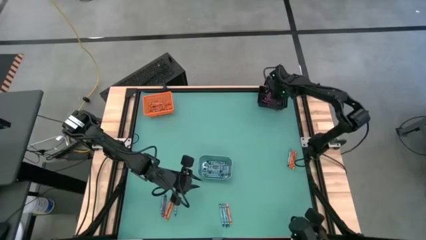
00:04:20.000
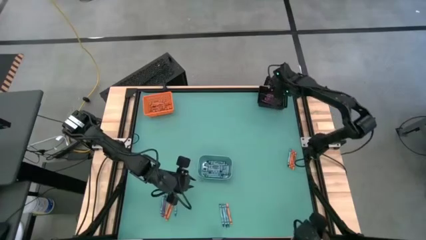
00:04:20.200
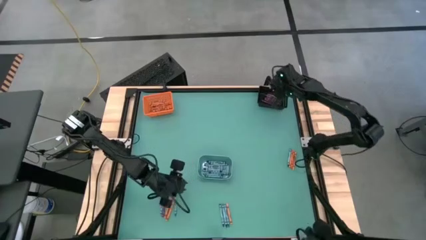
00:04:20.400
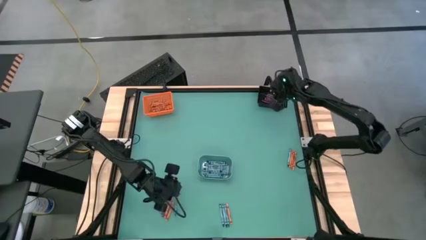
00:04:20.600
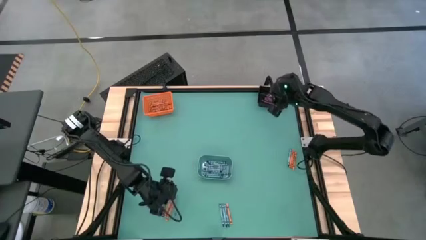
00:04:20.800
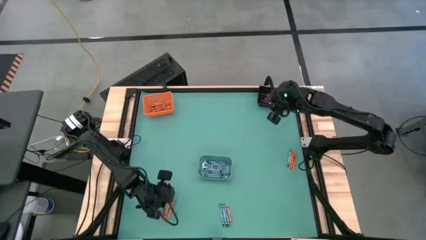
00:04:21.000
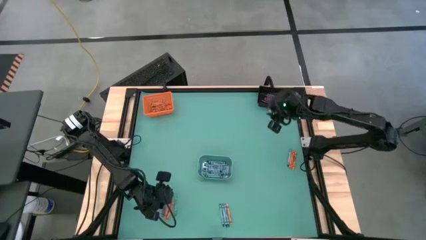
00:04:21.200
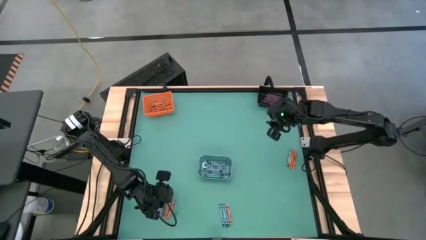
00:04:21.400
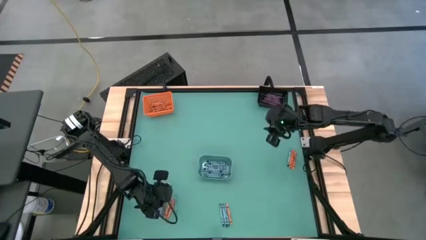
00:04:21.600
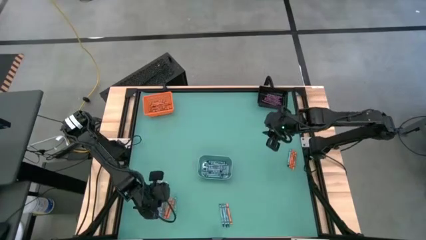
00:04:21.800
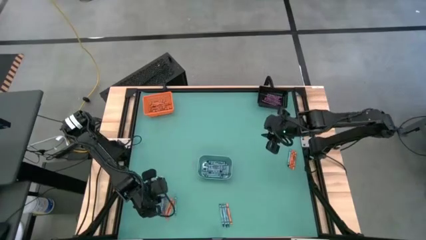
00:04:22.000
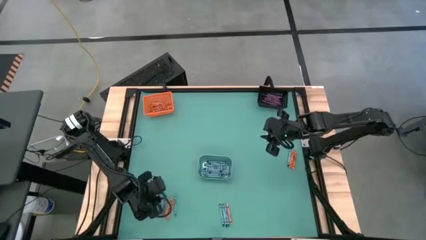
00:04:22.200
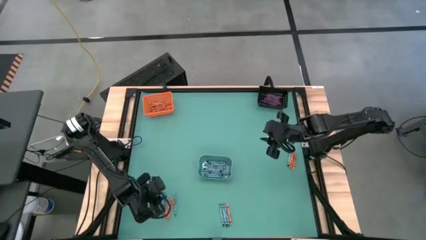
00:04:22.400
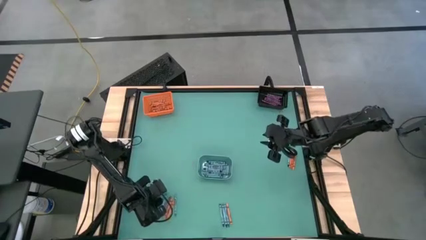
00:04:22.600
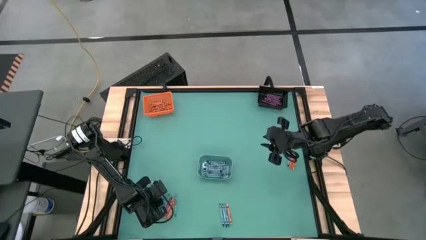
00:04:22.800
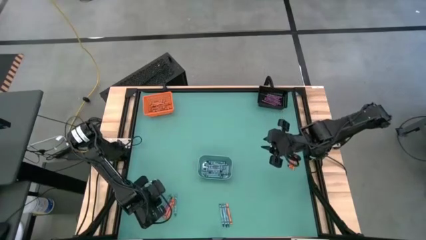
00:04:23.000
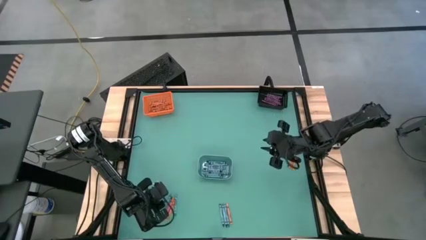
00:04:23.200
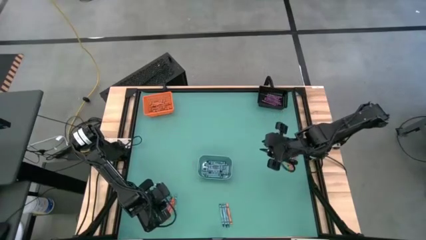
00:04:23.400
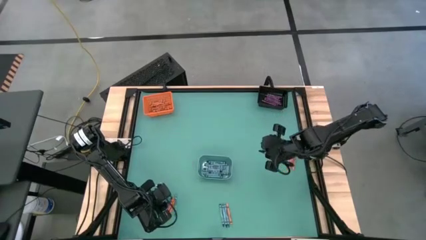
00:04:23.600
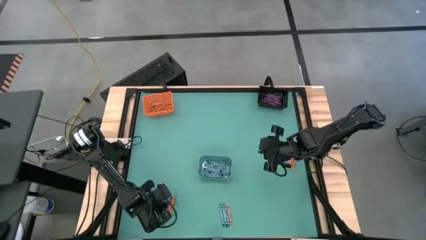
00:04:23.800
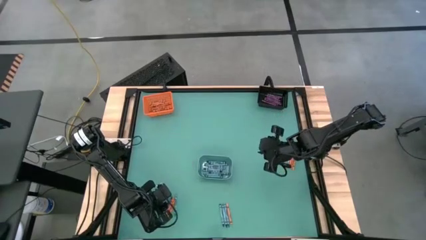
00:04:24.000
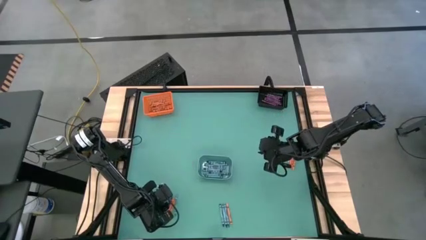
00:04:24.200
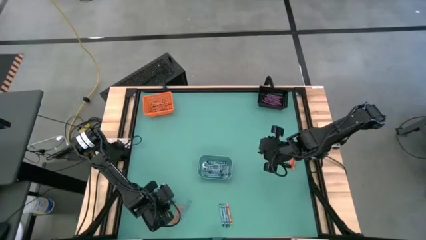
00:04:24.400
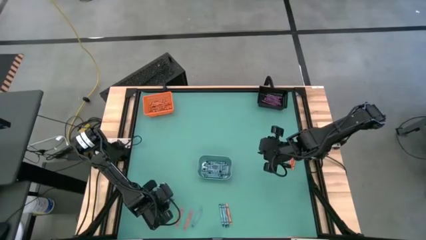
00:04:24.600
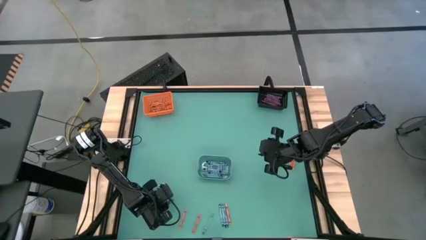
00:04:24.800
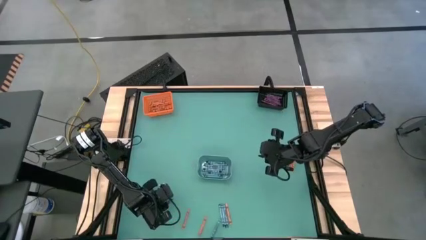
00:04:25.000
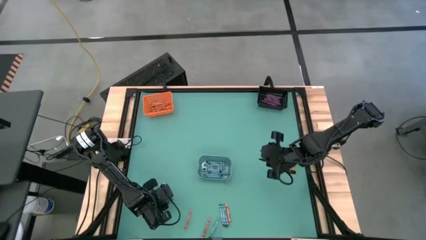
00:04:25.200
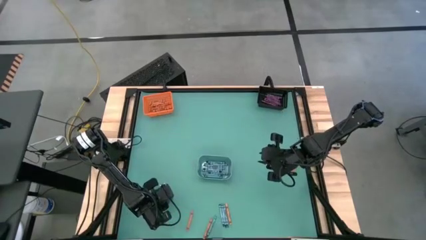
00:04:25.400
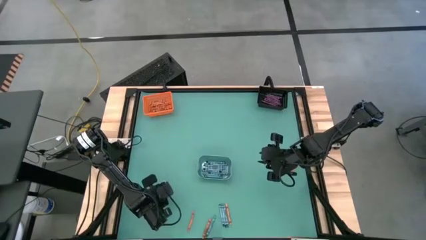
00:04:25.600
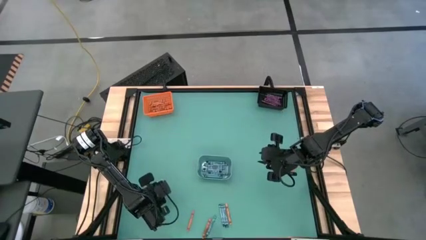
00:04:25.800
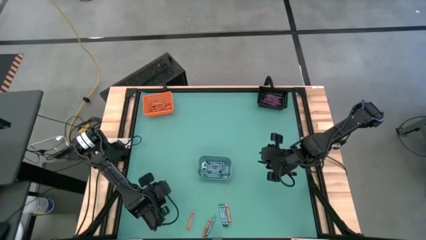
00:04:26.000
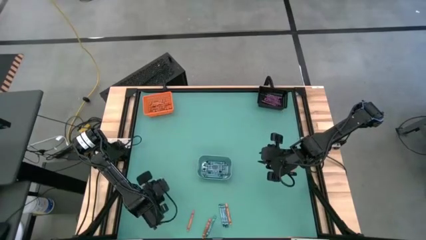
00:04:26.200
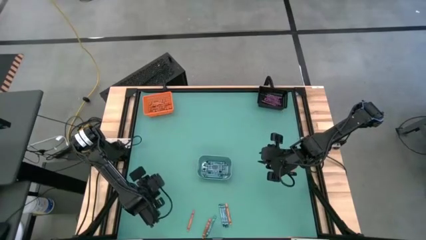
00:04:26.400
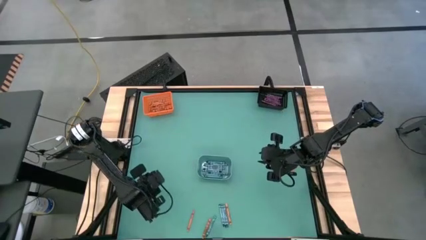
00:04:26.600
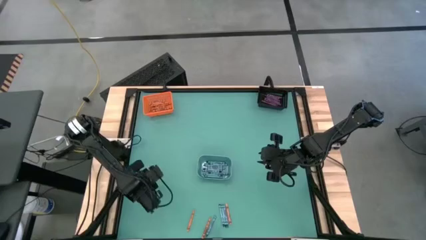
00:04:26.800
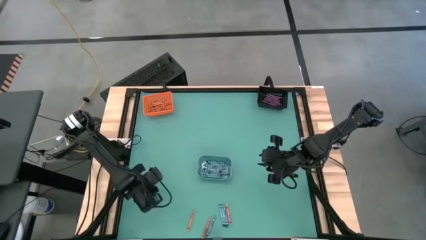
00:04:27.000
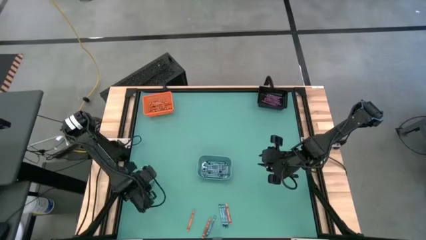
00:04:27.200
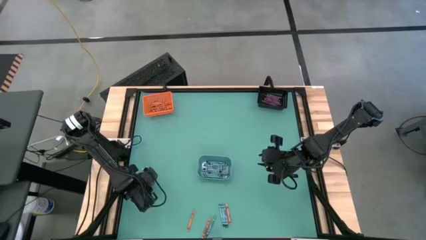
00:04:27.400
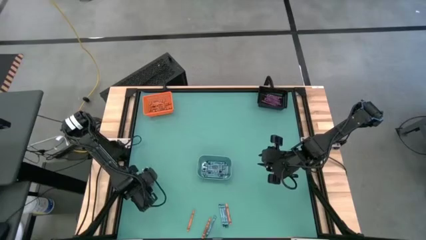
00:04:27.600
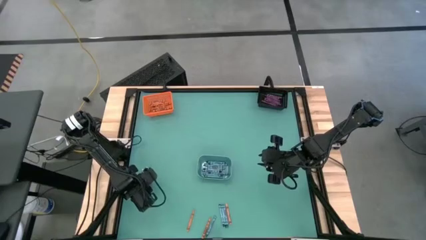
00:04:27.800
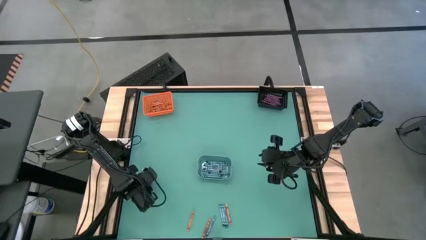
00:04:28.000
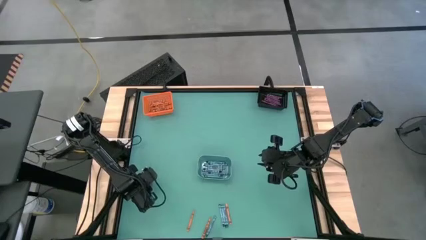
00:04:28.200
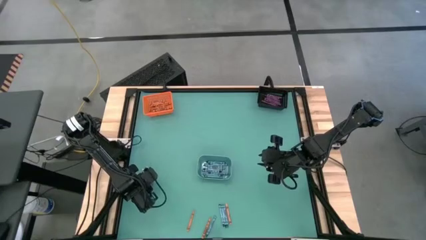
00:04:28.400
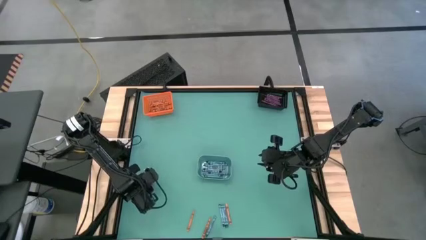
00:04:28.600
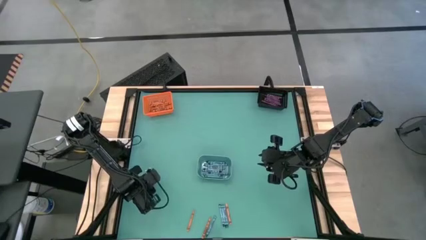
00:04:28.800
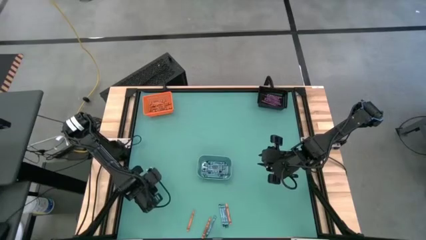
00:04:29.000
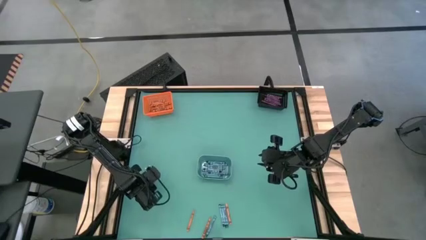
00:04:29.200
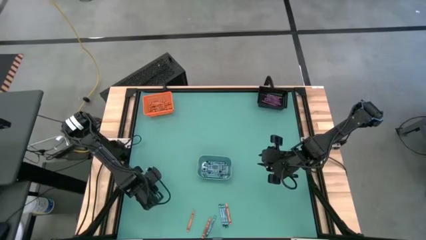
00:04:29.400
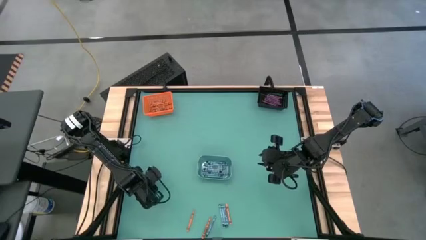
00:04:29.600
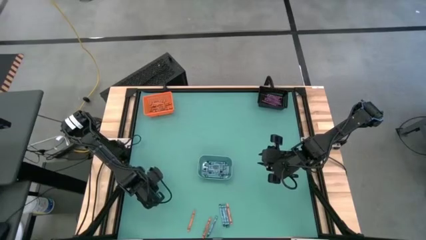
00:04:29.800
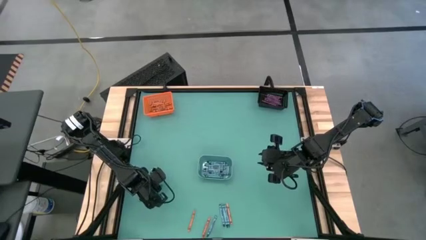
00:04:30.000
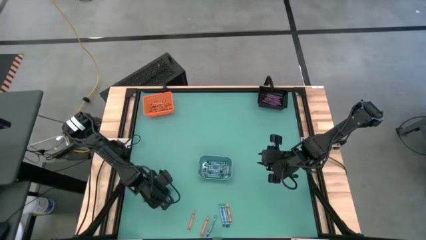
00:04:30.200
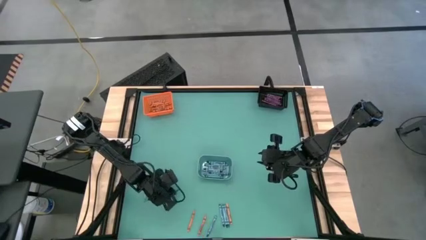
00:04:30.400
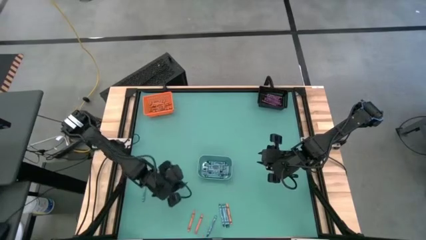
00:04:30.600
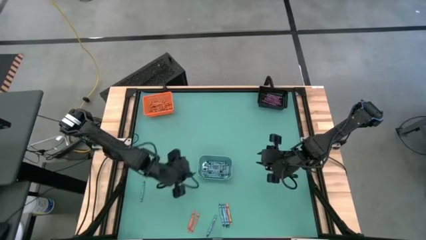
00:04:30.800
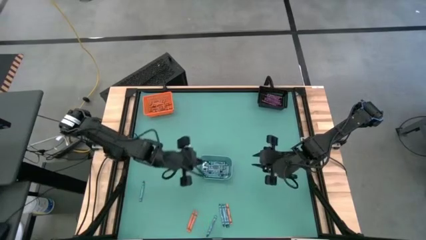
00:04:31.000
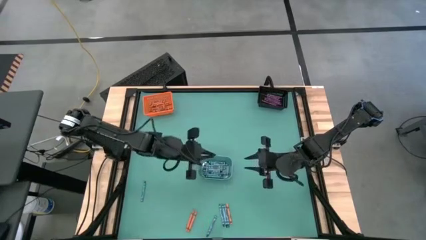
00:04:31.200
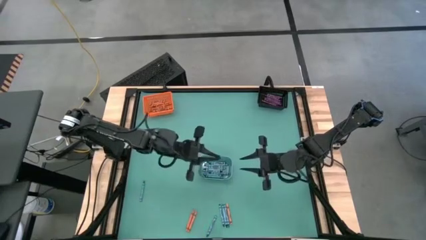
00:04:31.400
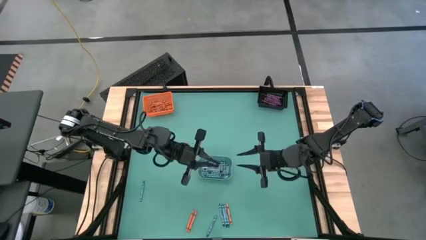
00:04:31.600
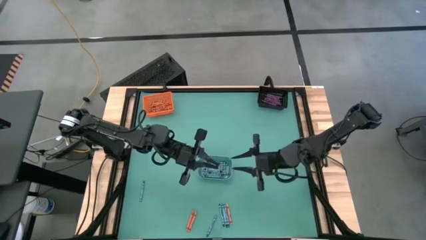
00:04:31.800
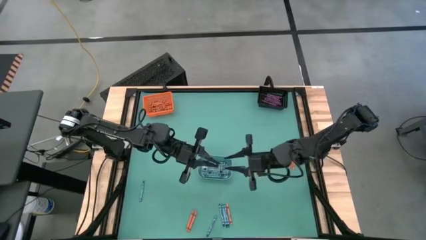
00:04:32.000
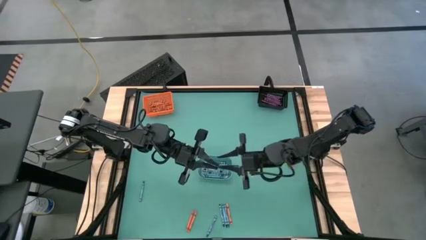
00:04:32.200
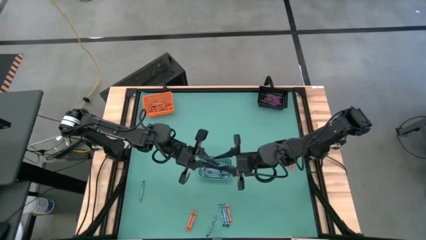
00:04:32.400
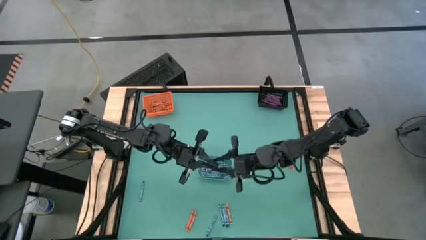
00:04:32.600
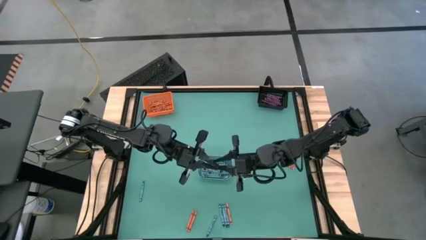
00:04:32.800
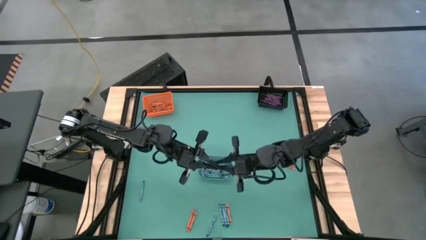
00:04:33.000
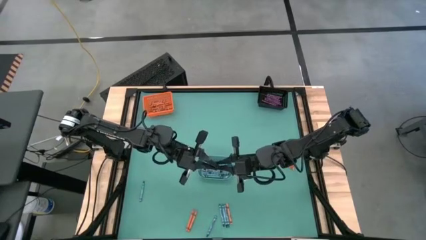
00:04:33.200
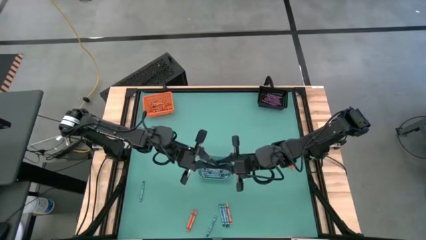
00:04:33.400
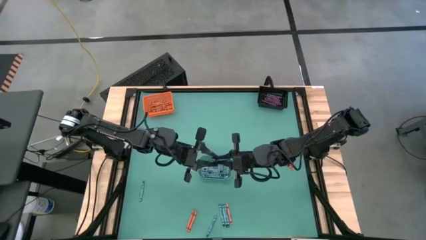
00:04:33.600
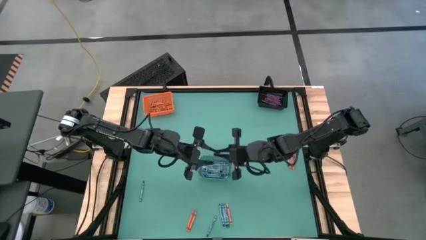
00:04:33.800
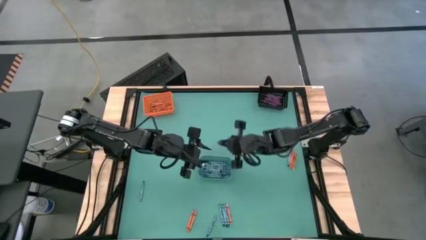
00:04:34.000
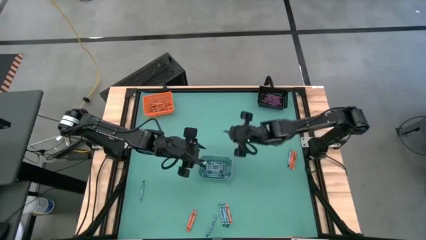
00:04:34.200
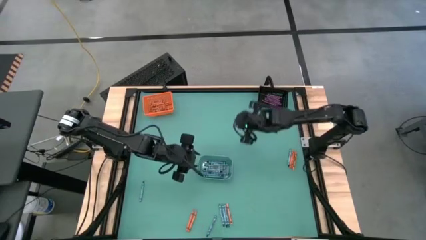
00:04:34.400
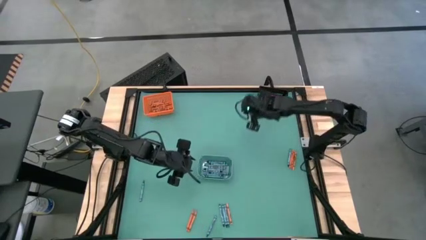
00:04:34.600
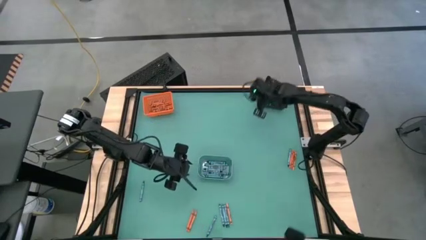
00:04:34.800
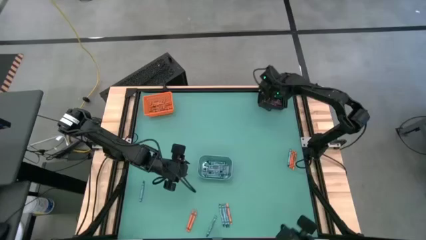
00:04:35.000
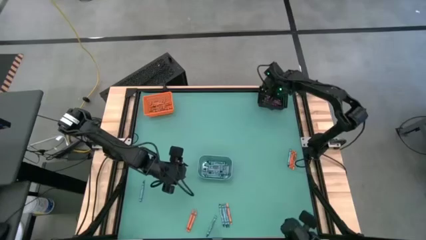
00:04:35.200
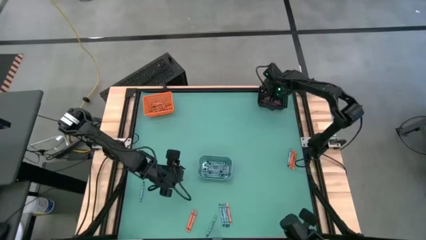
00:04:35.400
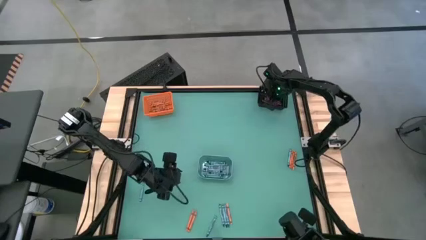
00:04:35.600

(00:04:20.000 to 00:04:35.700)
Task: Sort crayons
Put the violet crayon into the black bin

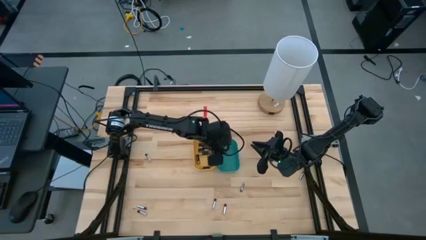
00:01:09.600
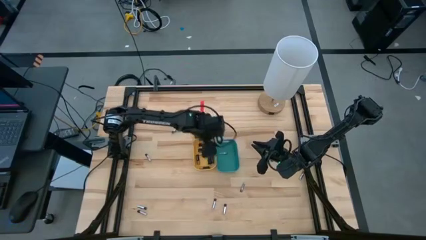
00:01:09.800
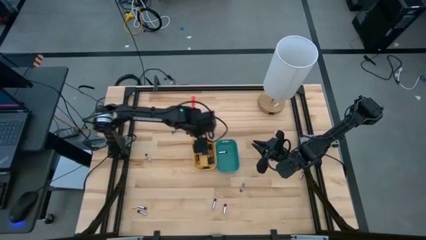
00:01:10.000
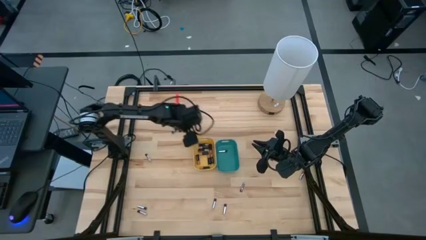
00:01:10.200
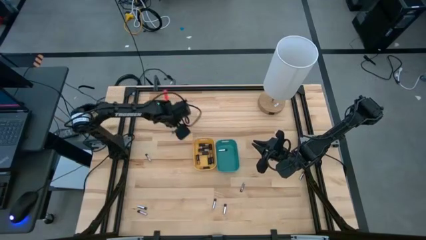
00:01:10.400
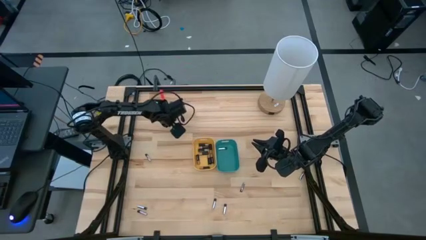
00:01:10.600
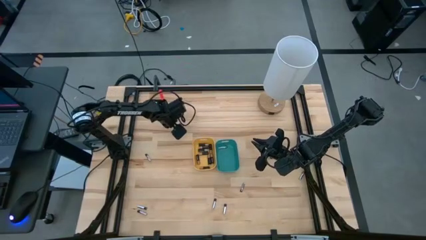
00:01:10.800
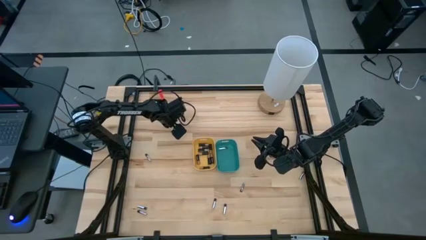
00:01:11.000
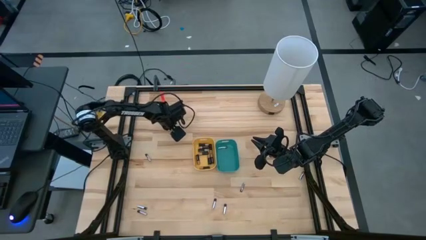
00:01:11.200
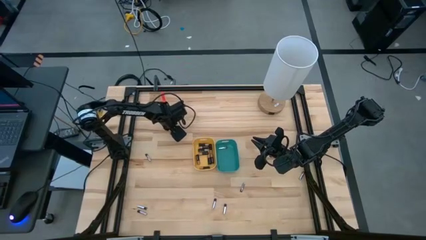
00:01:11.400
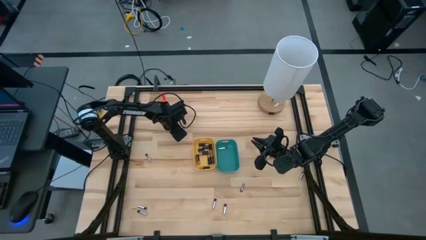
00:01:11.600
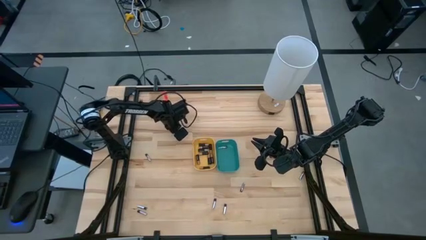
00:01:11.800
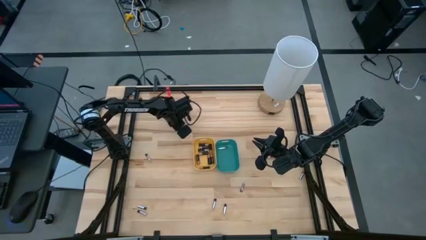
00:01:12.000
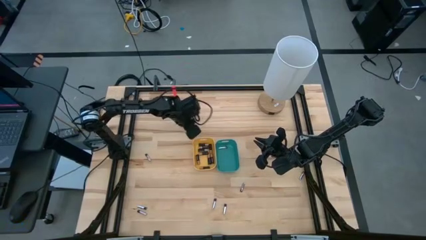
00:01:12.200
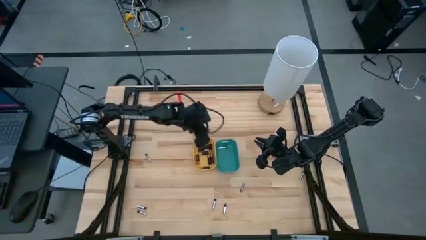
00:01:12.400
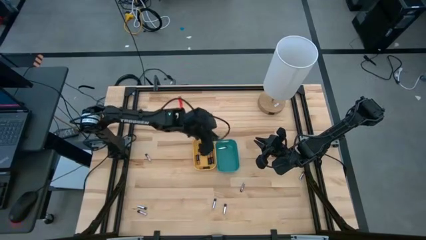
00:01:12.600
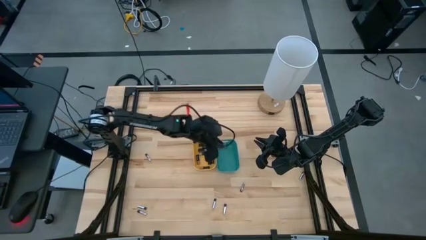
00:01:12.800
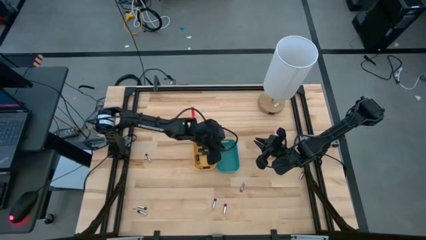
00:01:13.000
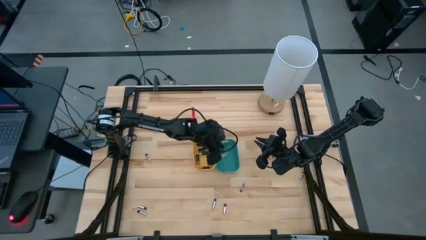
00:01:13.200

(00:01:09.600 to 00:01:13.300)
Task: Sort batteries
Put the silver battery into the green bin
